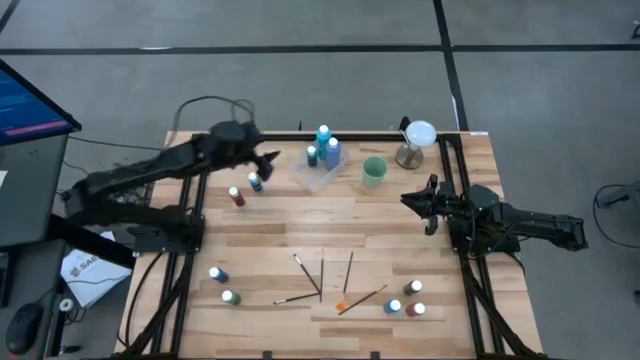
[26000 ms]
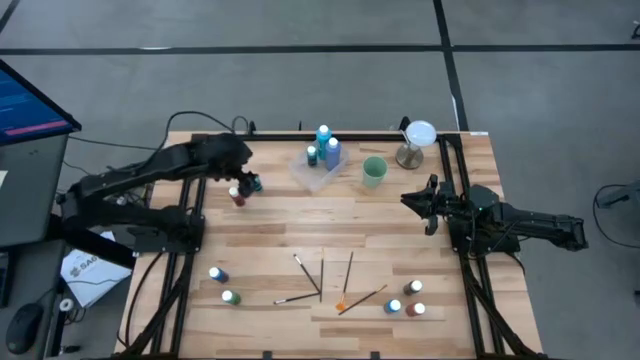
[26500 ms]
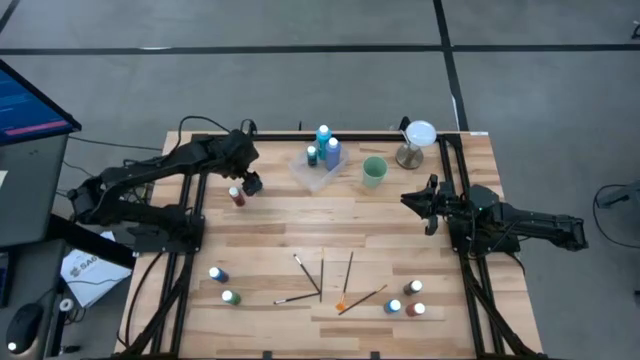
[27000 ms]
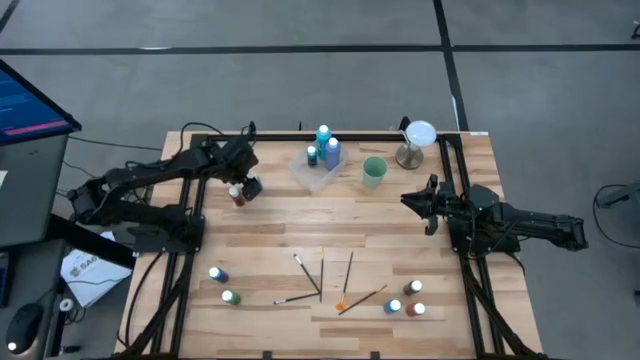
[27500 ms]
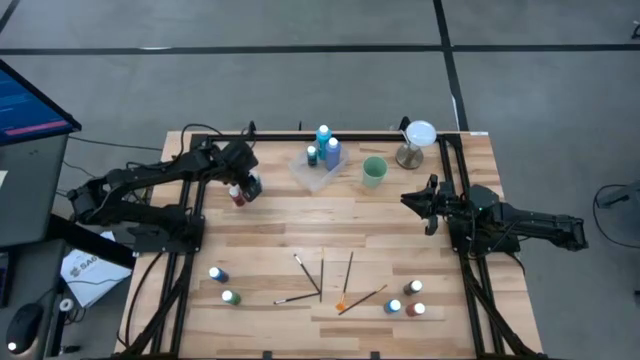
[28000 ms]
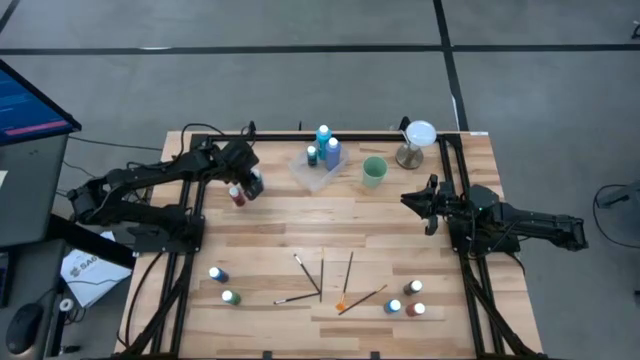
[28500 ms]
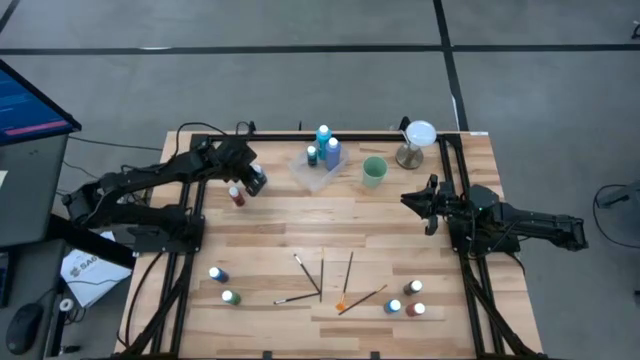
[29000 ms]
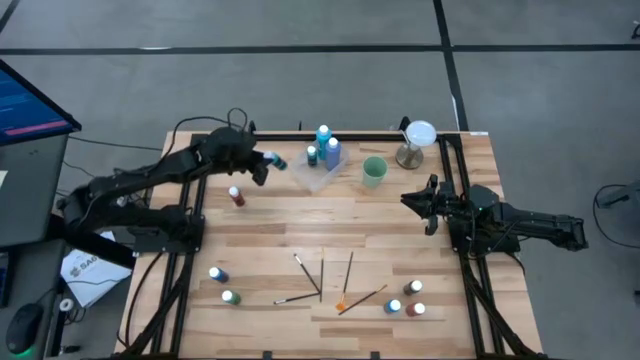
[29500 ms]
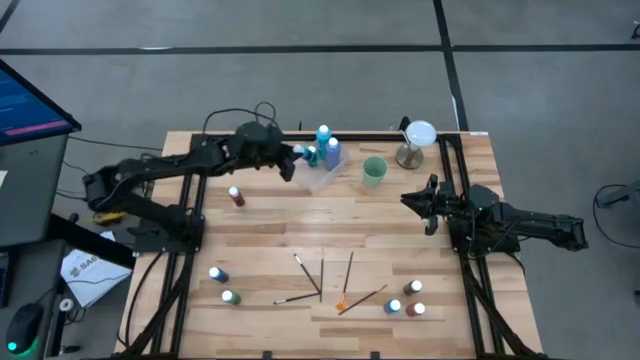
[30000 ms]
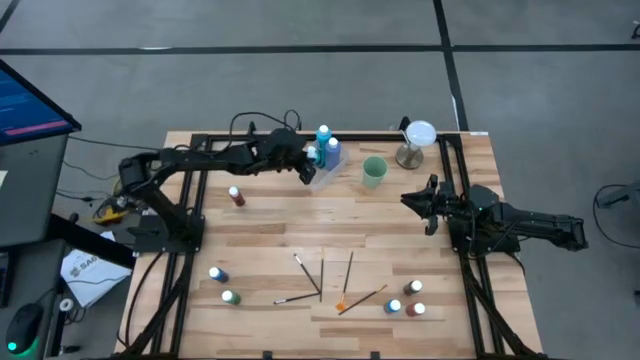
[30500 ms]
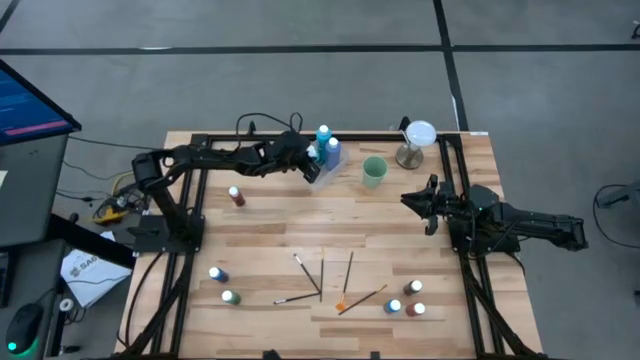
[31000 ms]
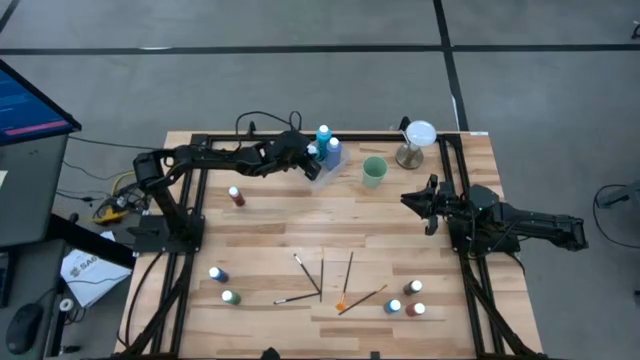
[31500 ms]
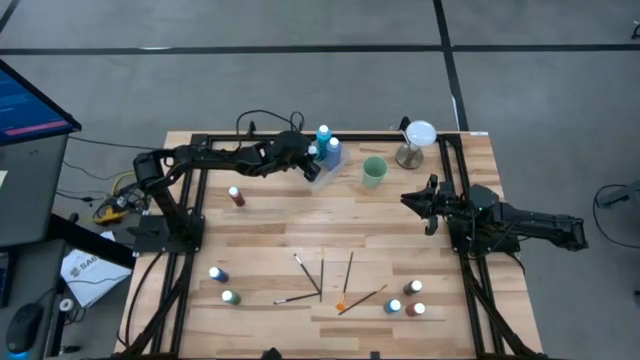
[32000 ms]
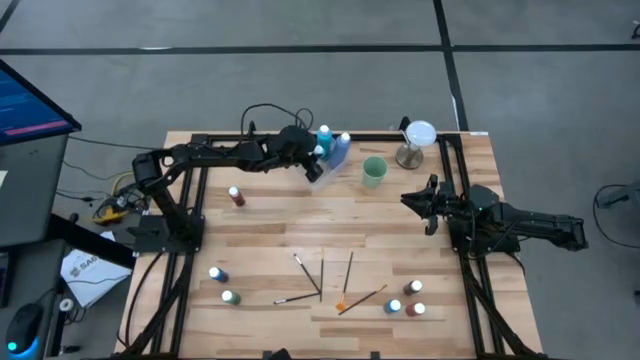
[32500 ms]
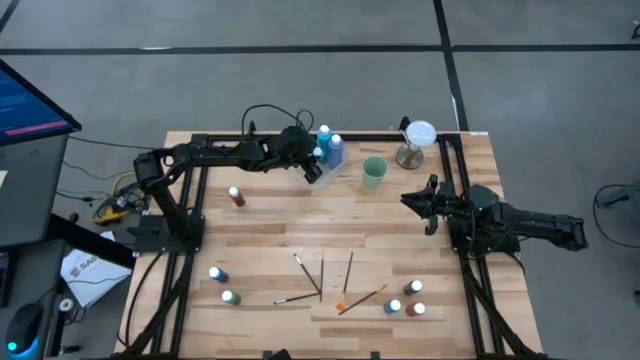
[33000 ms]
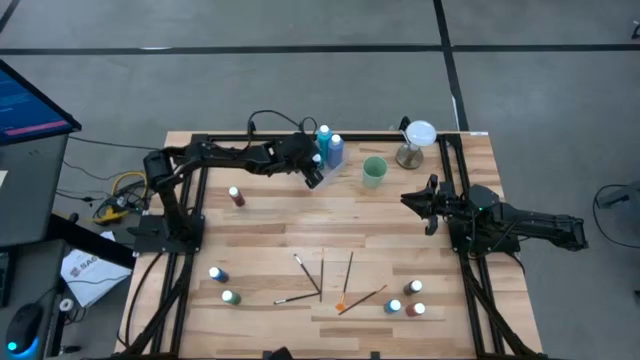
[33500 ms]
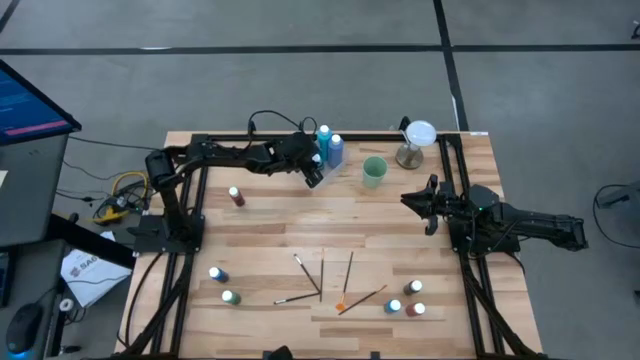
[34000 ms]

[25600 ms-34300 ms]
Task: Pick & Place Paint Supplies
Put the top small light blue paint bottle into the transparent bin

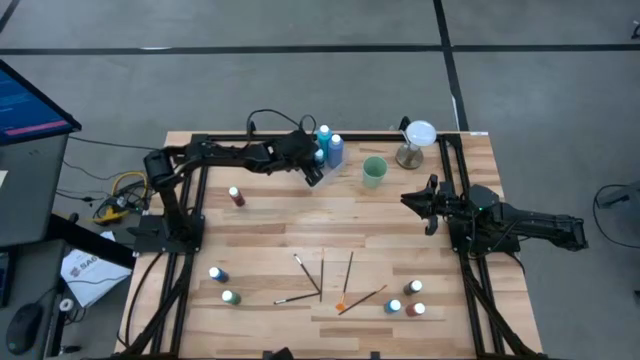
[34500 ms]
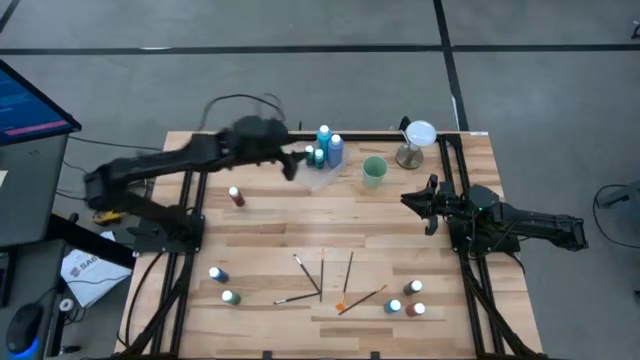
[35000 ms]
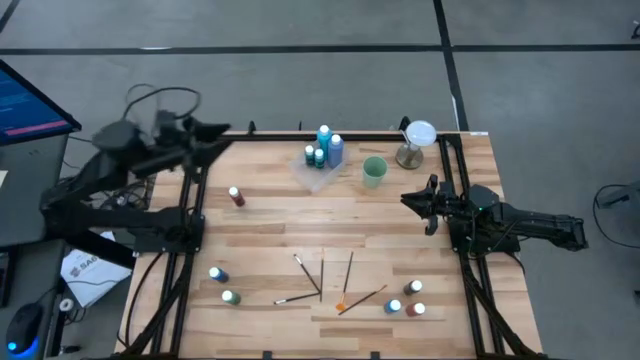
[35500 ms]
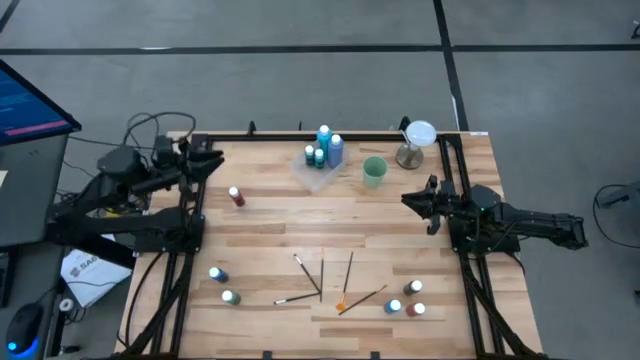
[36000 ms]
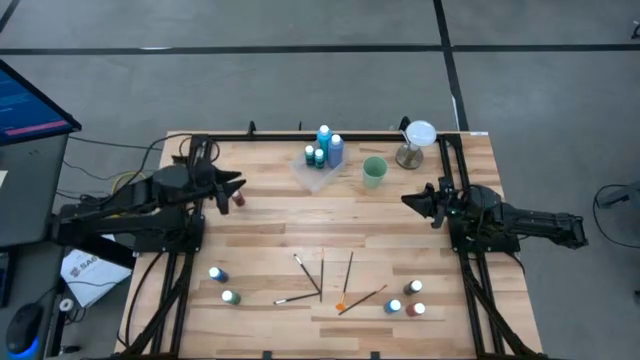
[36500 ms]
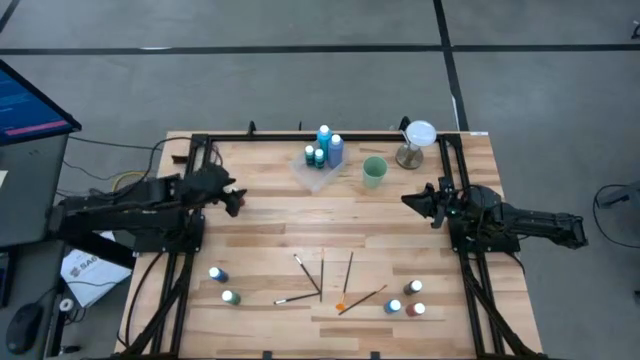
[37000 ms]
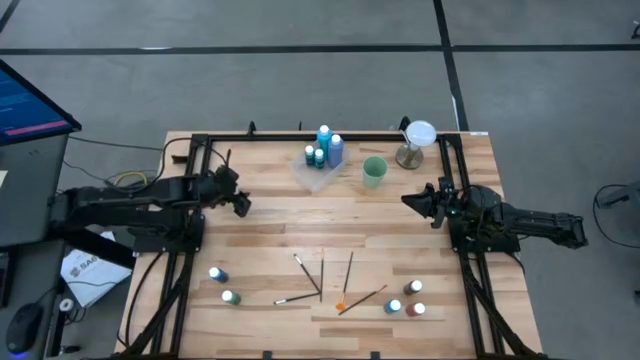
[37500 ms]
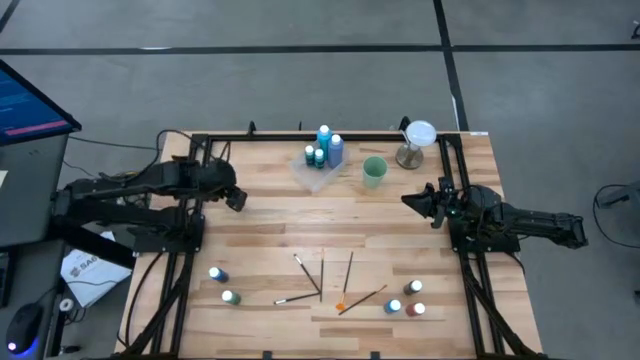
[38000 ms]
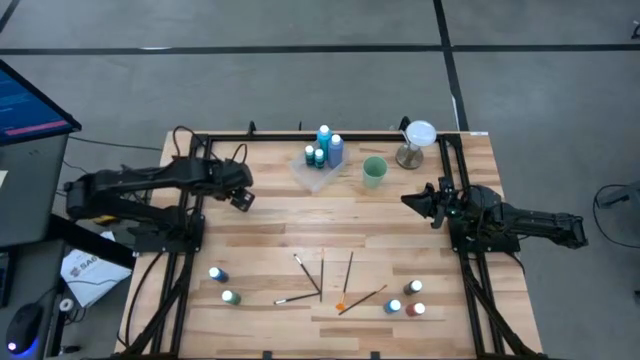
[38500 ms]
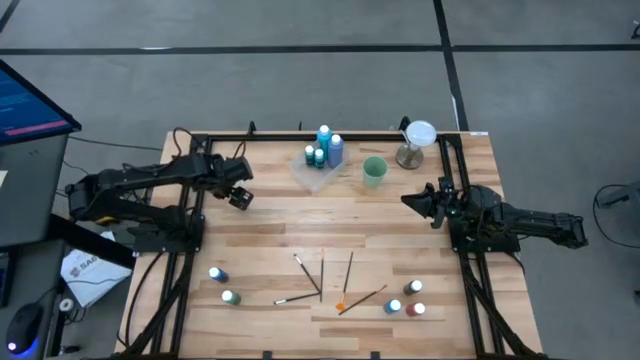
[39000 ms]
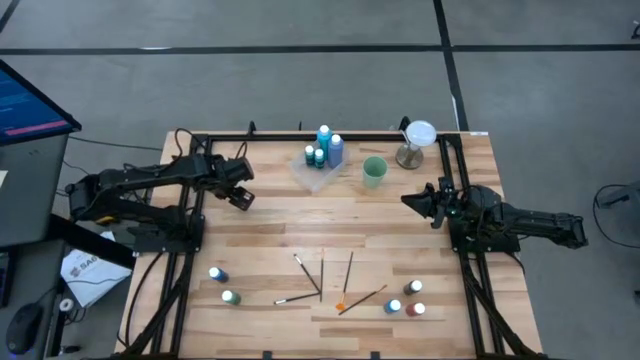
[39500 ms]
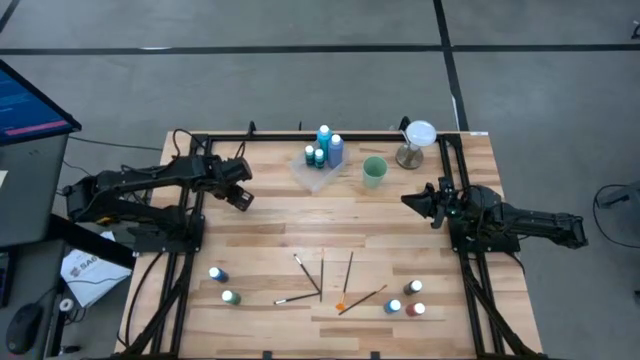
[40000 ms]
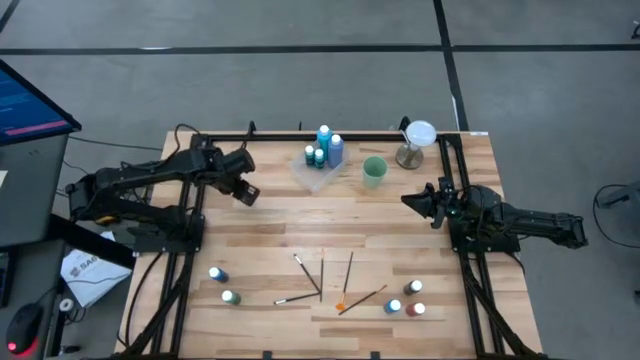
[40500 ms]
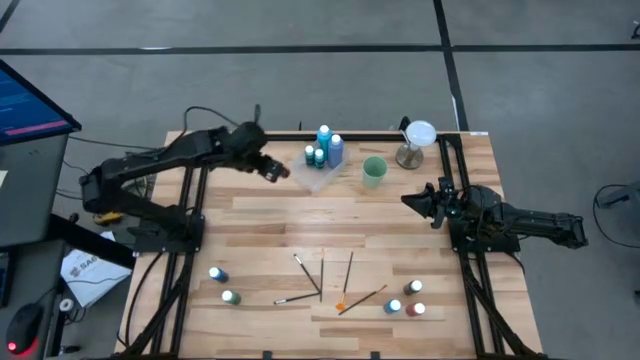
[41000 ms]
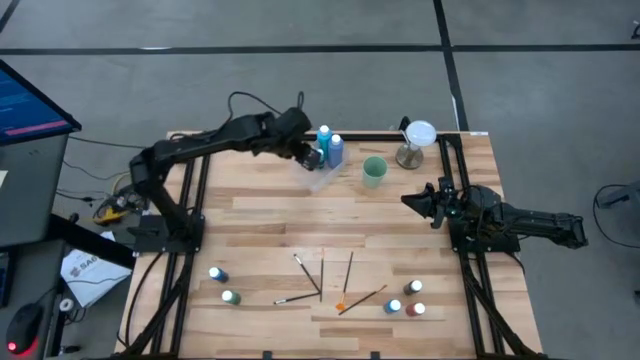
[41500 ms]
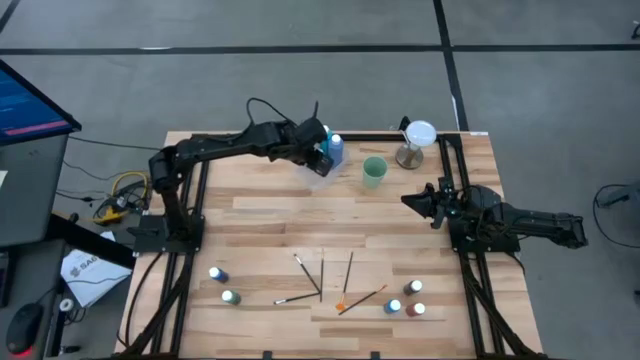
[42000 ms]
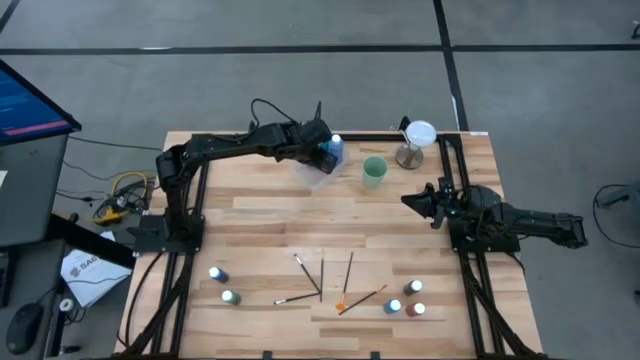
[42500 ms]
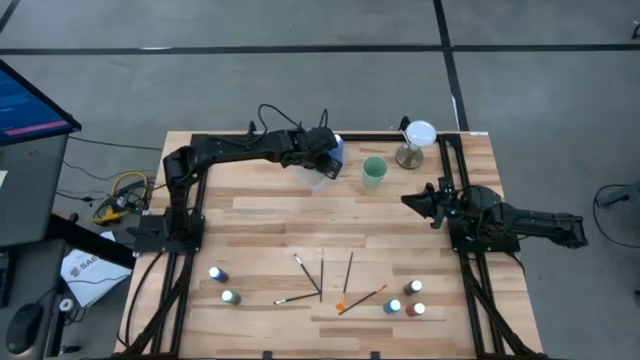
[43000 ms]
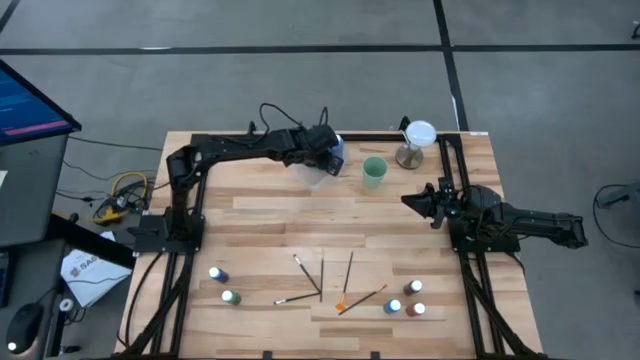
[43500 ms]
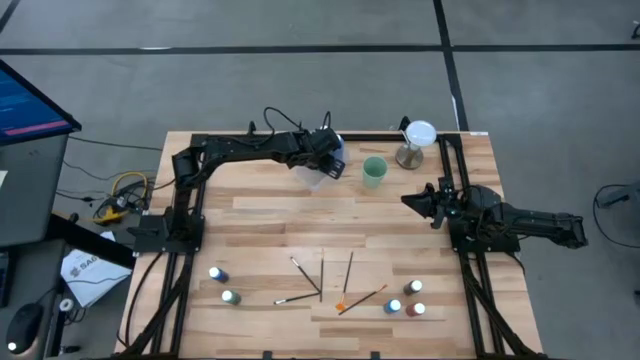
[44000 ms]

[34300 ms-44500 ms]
Put the top small red paint bottle into the transparent bin

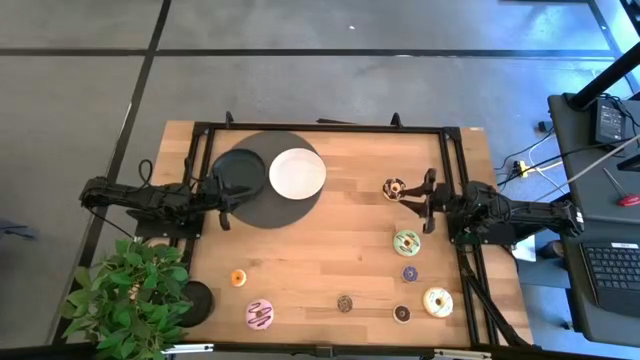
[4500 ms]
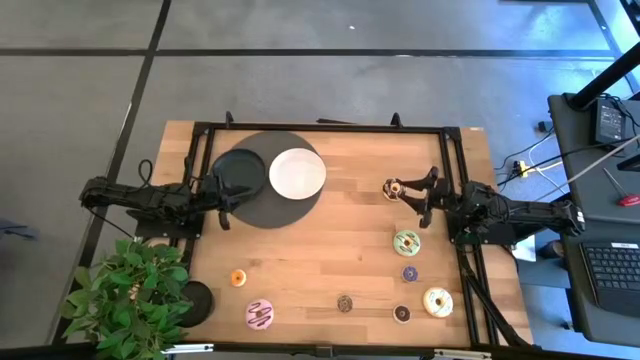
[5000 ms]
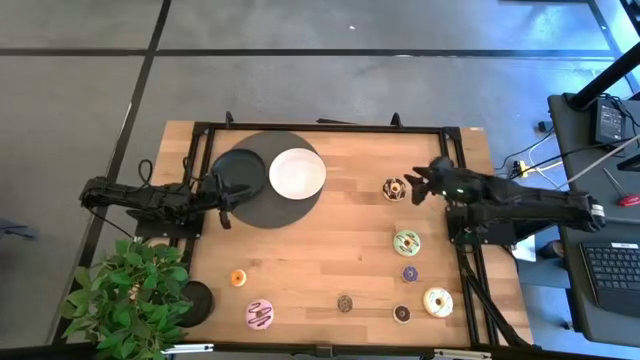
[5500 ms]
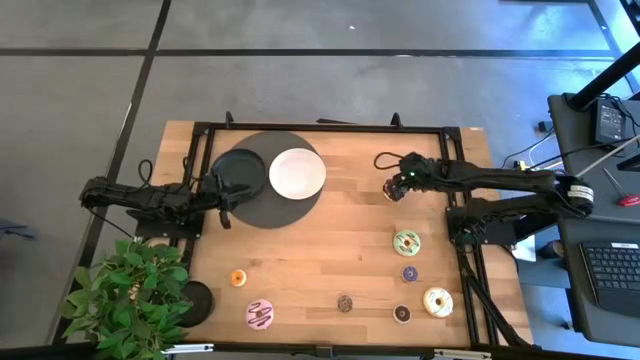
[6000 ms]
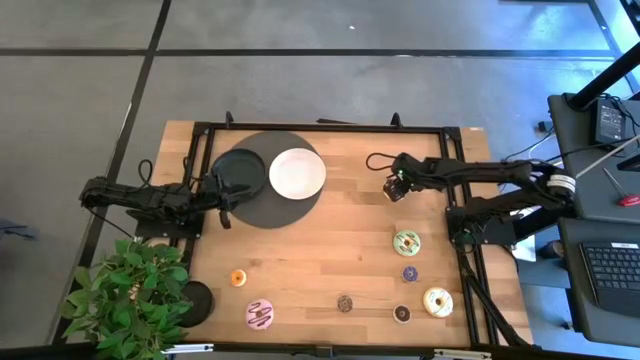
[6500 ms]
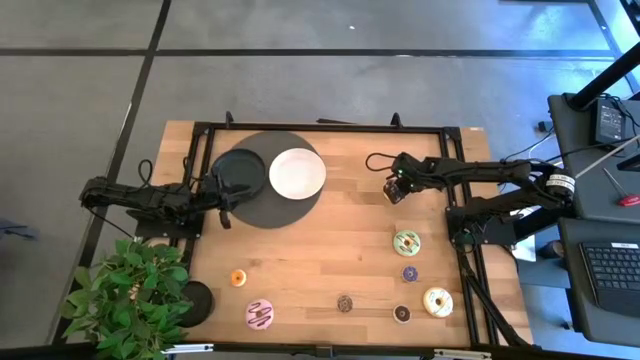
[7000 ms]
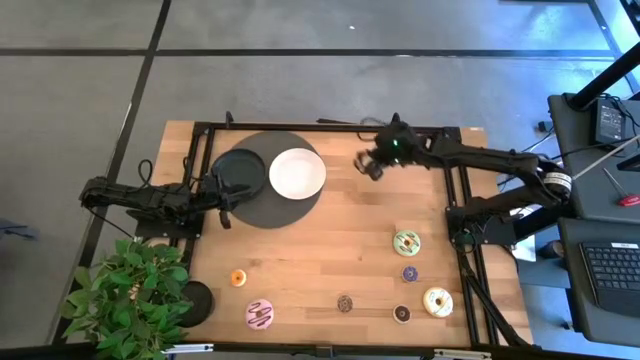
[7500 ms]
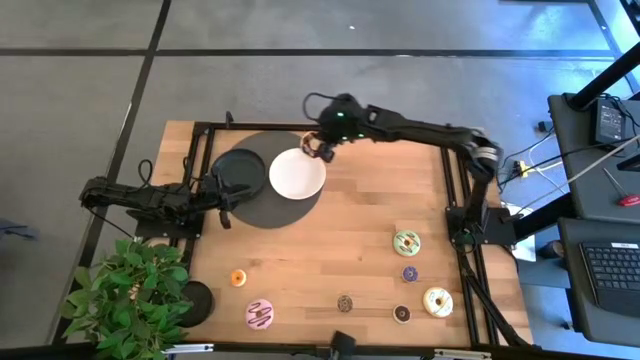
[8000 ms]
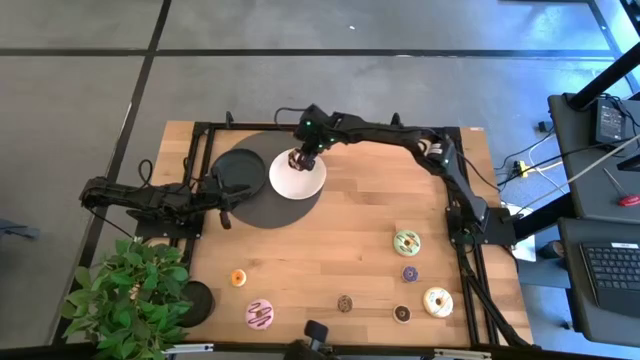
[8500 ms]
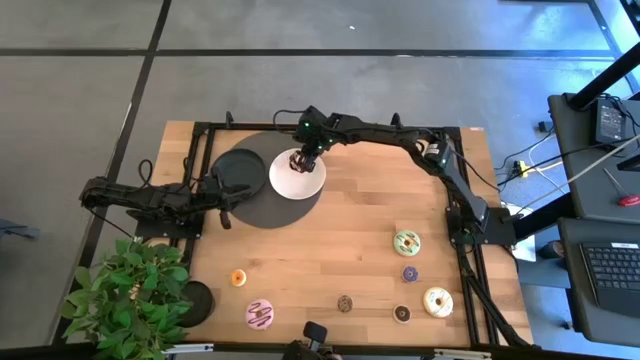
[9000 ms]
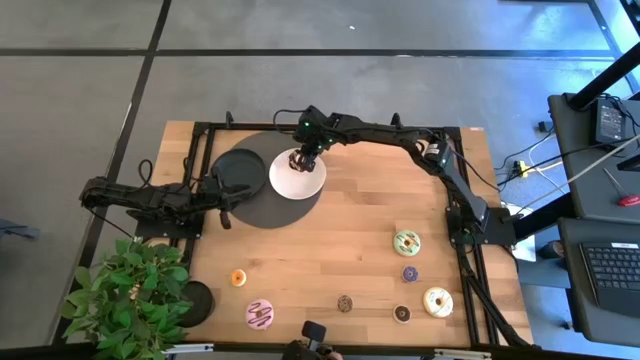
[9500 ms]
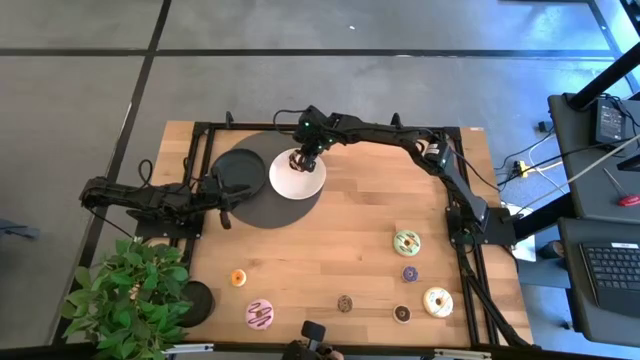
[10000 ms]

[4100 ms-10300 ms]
Task: Pick & Place donuts
Put the big black donut on the white plate
